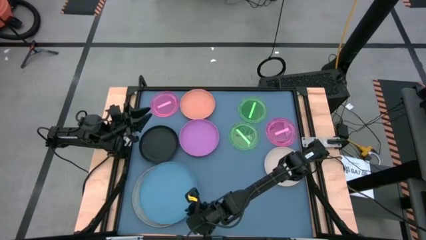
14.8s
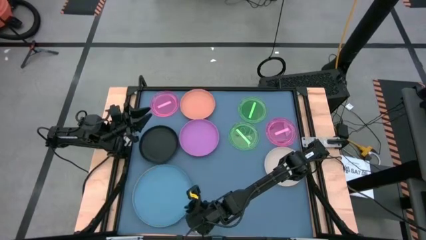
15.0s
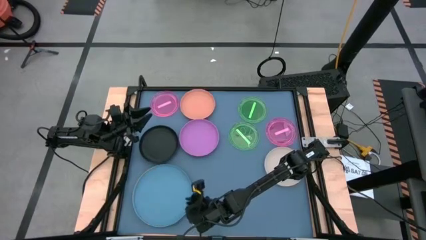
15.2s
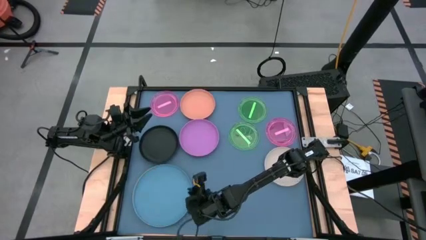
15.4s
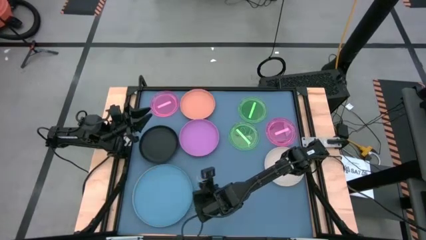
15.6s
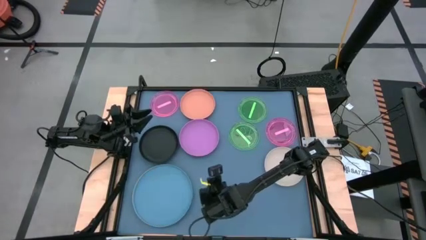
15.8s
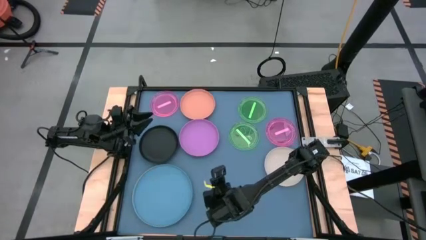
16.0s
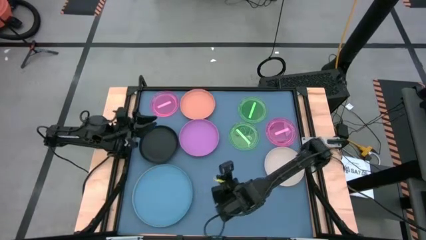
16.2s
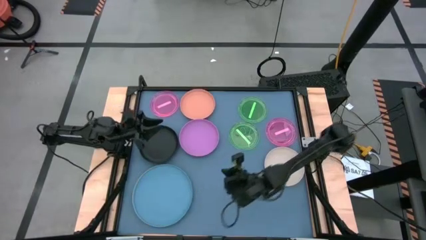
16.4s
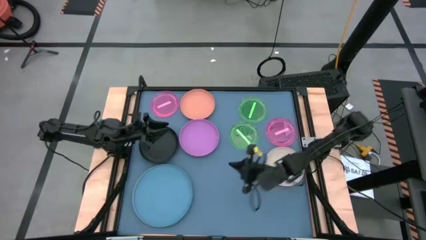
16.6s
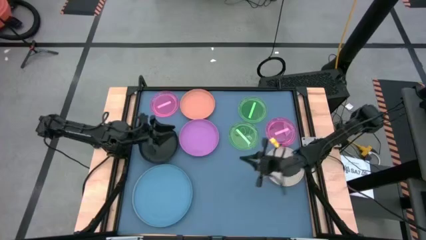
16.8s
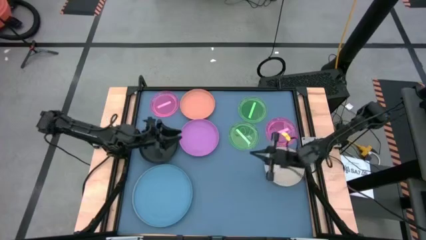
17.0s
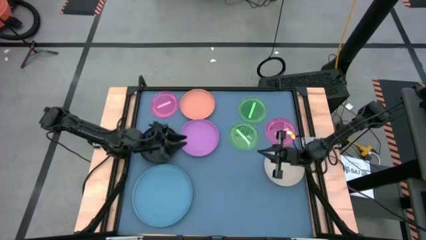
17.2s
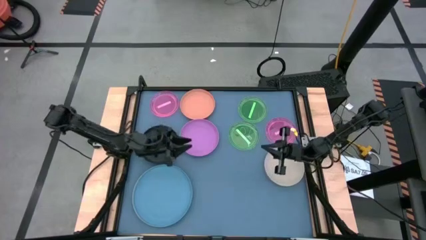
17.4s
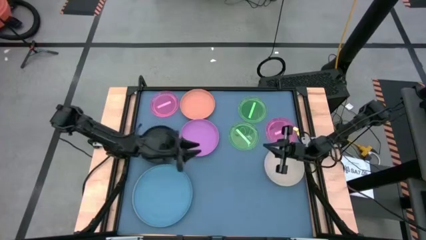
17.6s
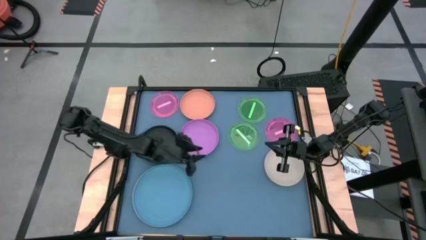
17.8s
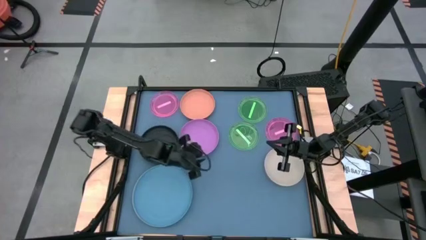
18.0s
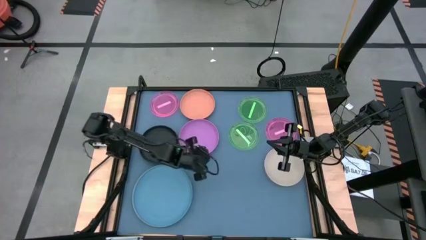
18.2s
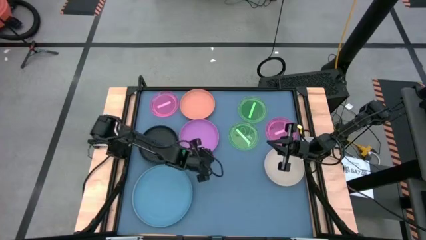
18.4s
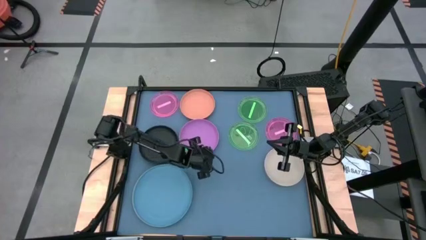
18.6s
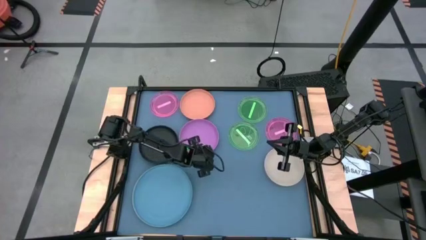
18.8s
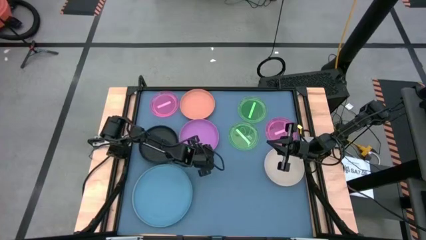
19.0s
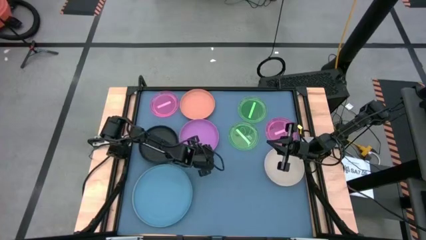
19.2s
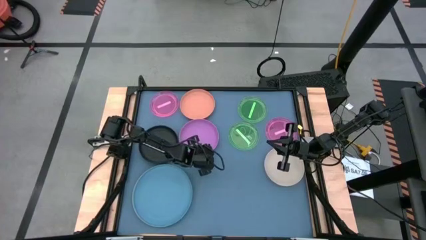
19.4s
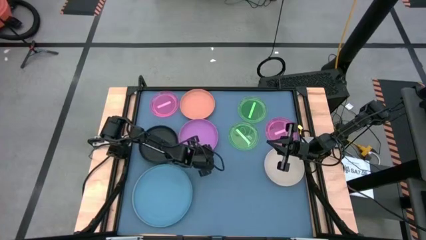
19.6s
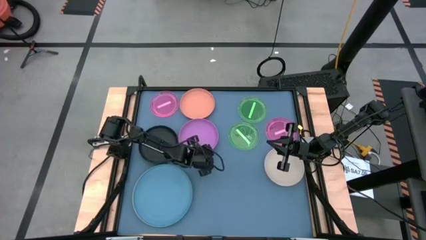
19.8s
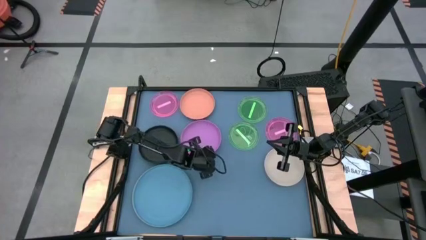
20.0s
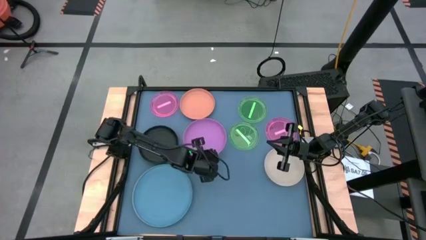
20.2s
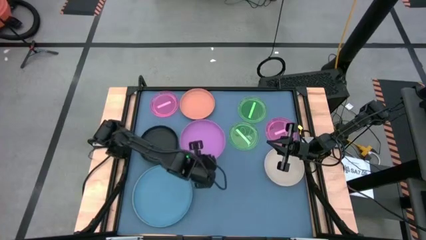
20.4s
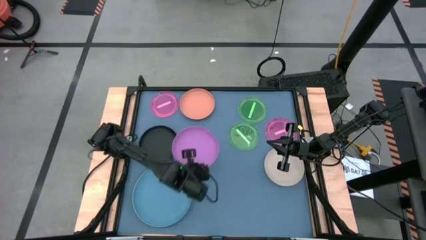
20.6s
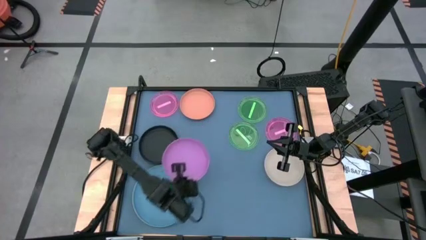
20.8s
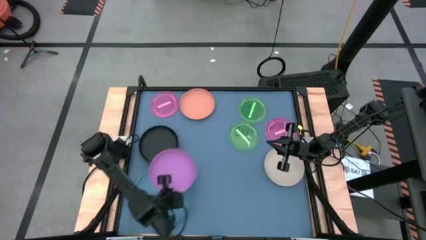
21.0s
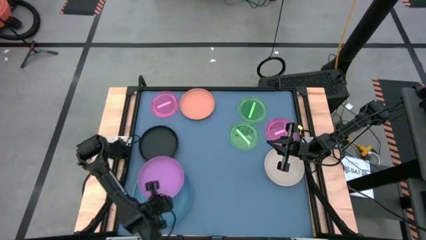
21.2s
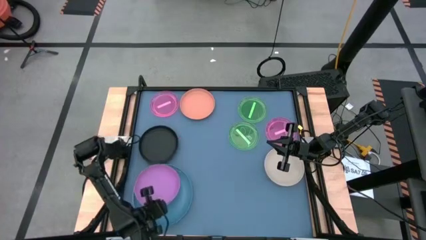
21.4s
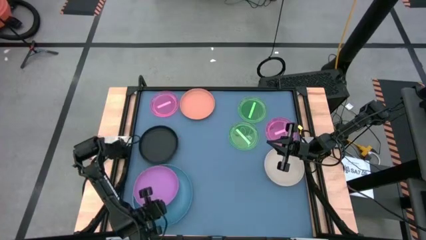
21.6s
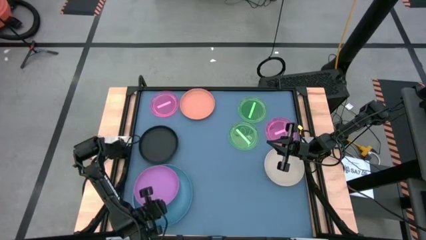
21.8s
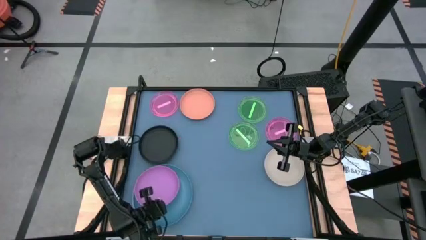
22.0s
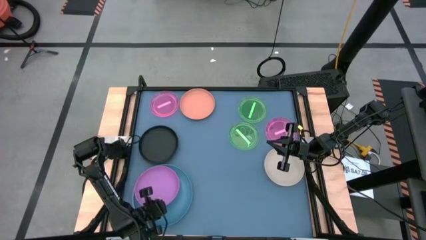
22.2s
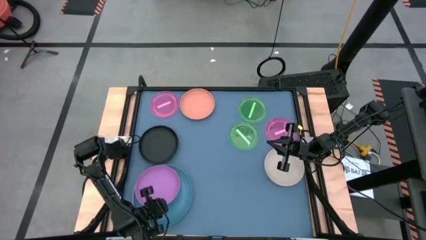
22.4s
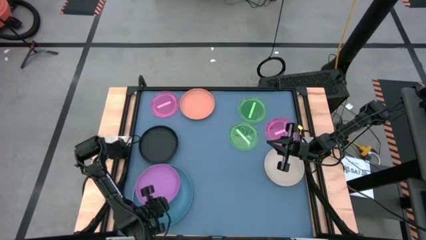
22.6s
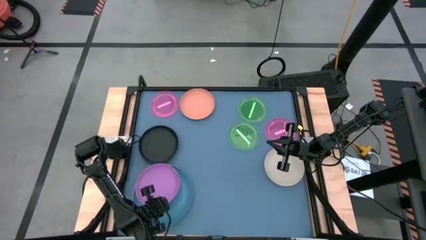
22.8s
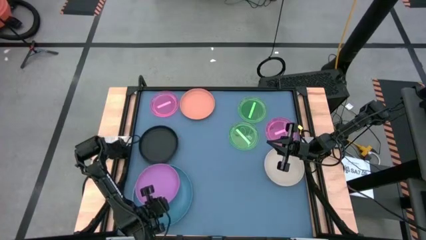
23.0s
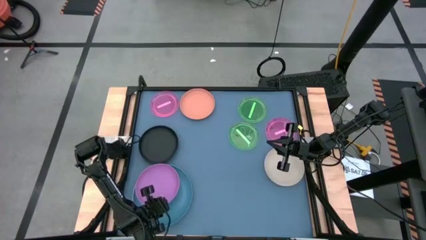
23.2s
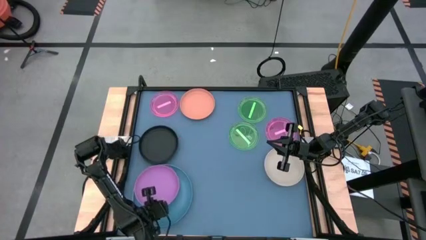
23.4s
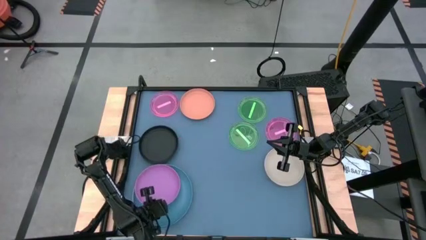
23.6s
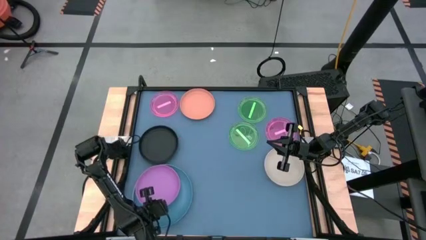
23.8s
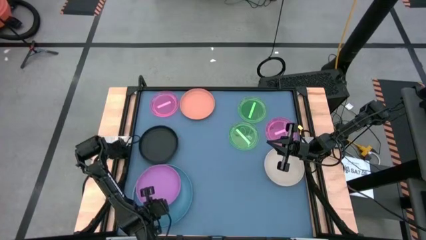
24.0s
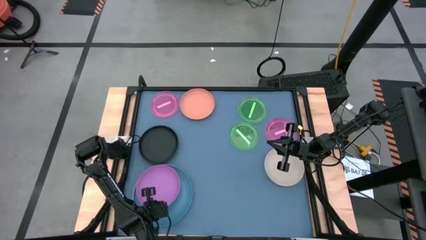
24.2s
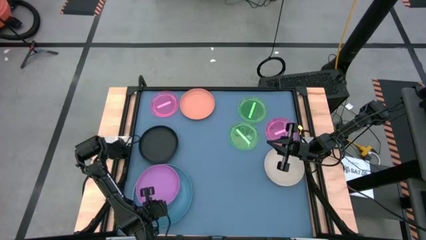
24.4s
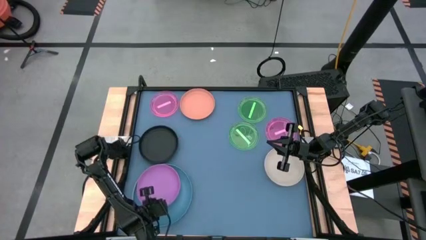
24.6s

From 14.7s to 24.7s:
Task: Stack plastic plates
Stack the purple plate on top of the blue plate

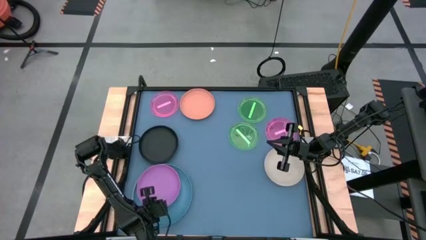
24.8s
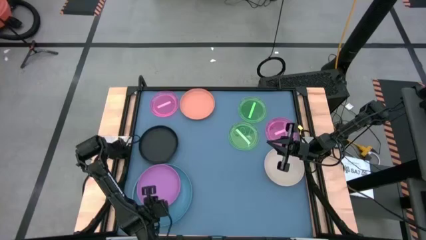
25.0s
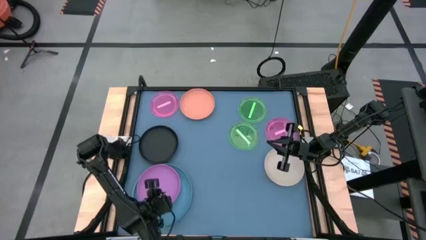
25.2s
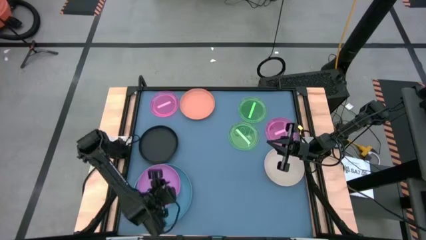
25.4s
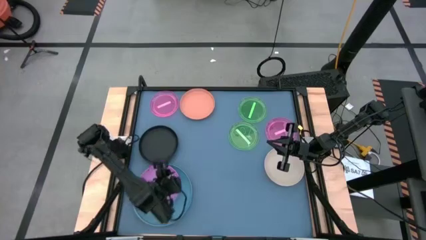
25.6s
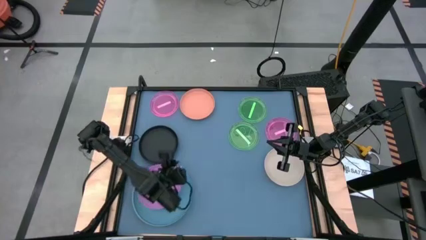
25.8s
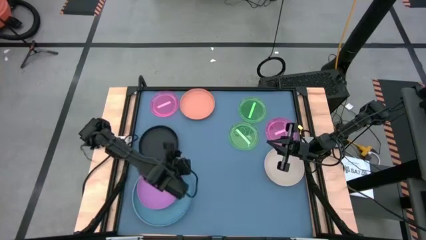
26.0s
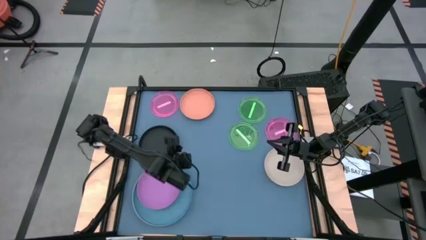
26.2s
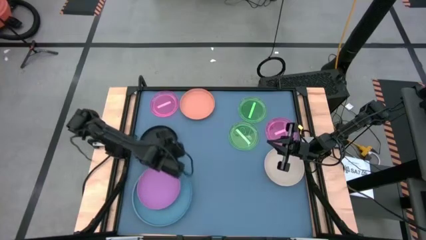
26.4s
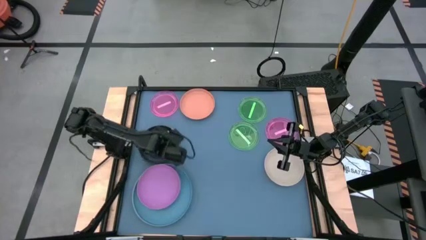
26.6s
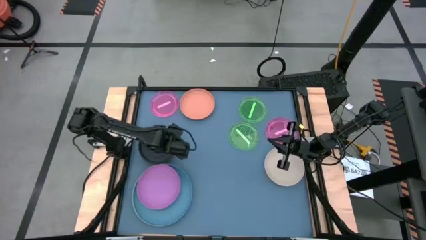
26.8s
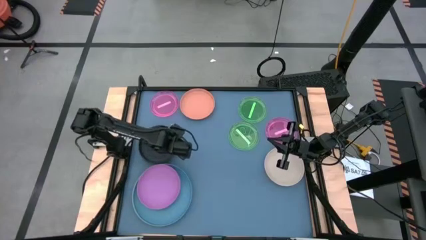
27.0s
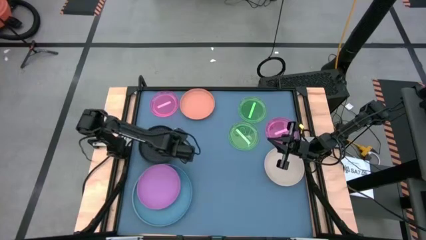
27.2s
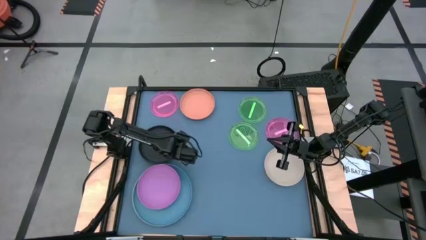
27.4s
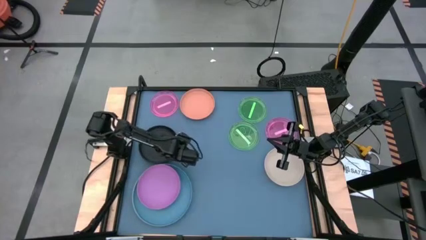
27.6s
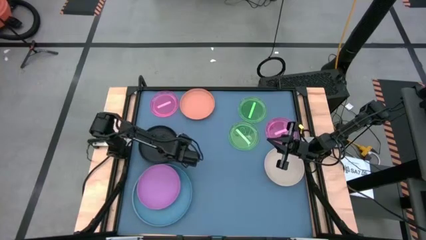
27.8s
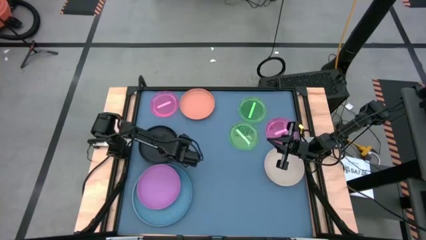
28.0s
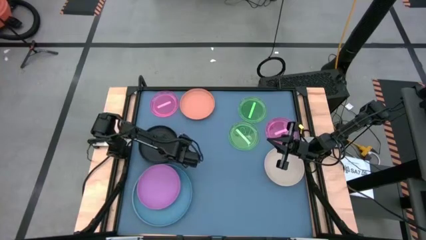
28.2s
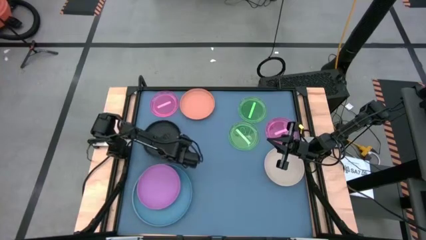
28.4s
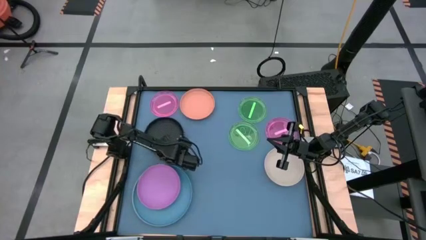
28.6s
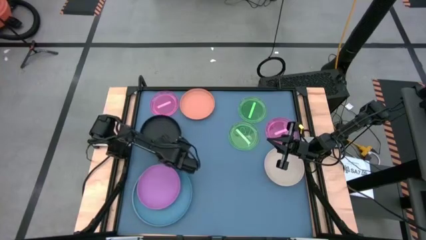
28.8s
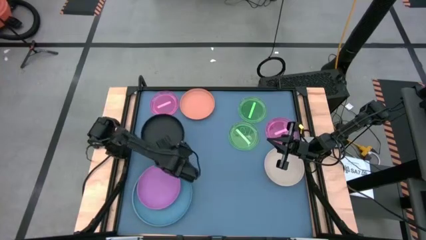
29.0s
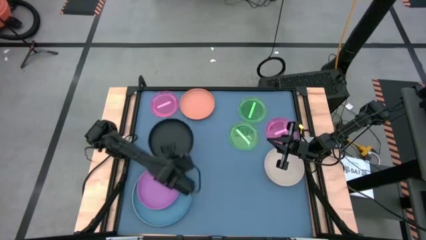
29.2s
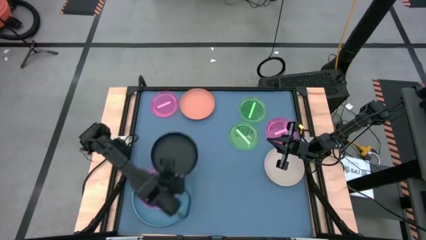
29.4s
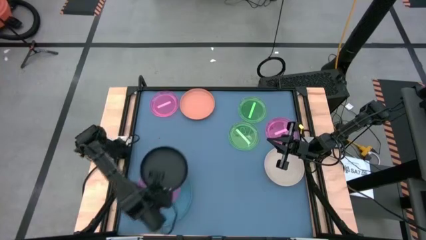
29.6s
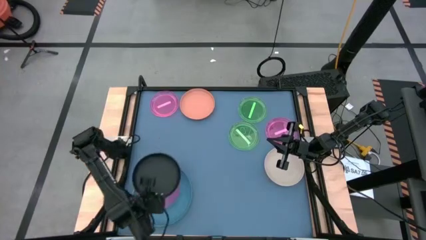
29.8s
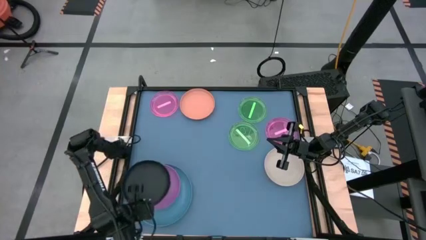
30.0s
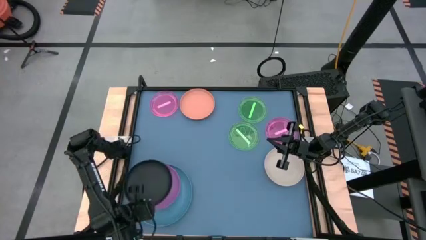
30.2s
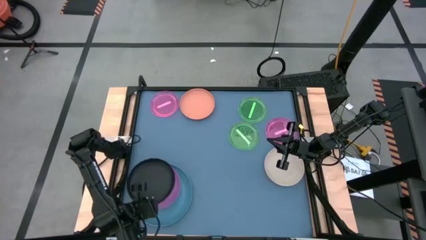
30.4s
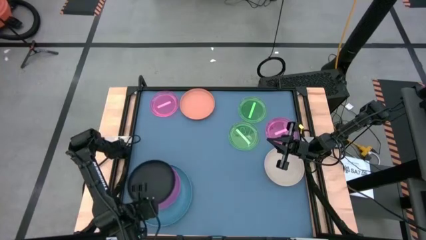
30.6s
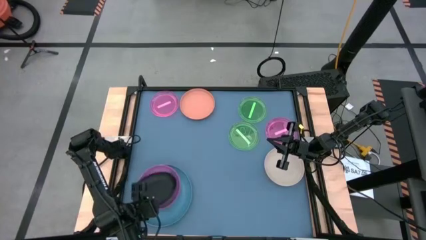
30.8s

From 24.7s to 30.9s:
Stack the black plate on top of the purple plate

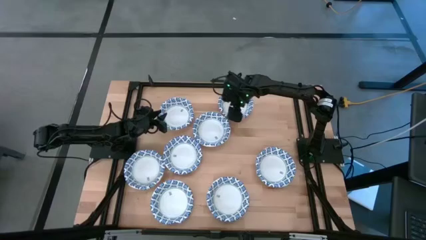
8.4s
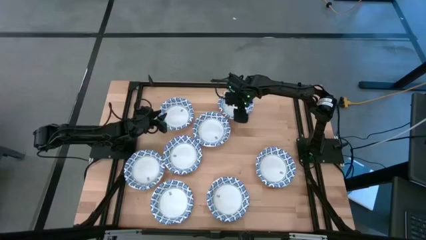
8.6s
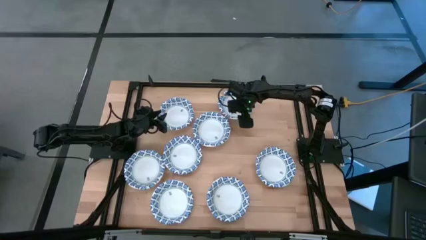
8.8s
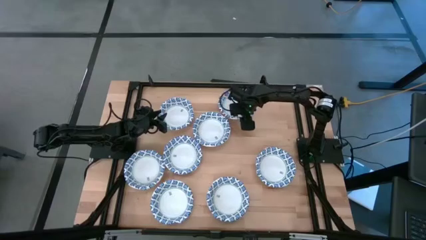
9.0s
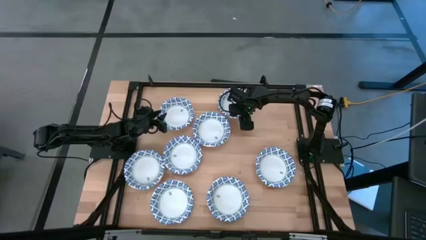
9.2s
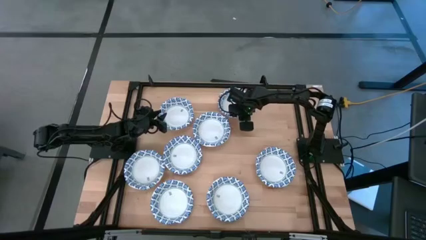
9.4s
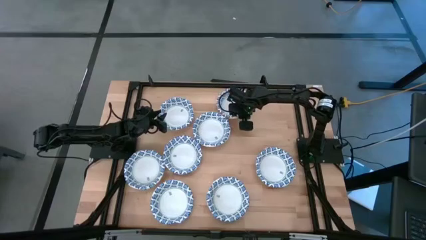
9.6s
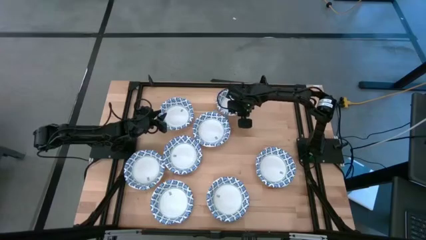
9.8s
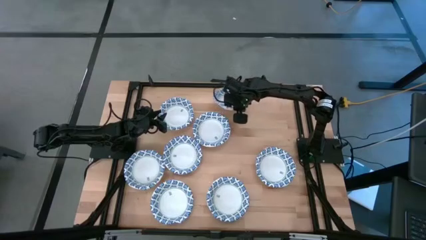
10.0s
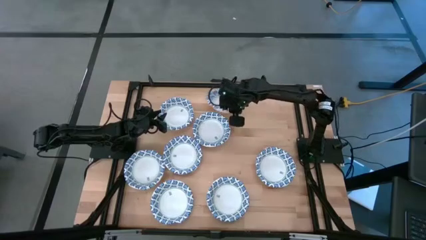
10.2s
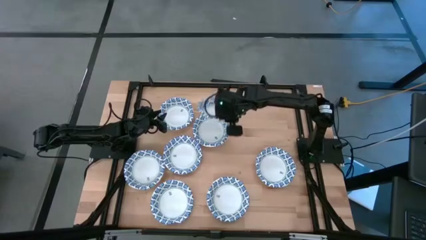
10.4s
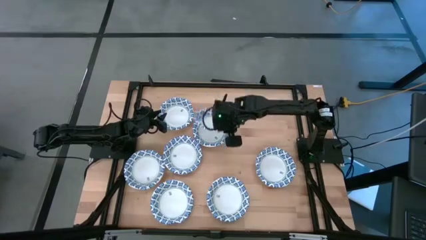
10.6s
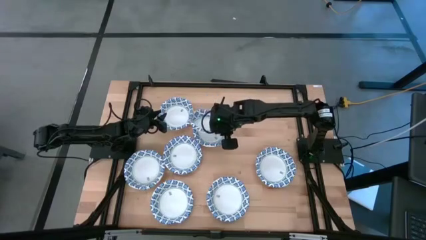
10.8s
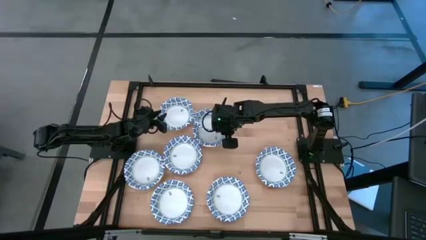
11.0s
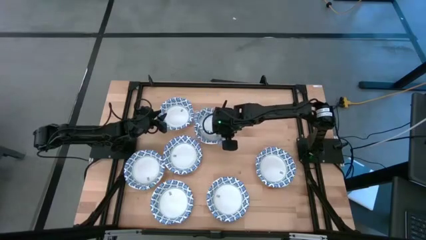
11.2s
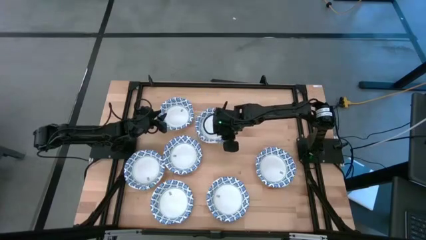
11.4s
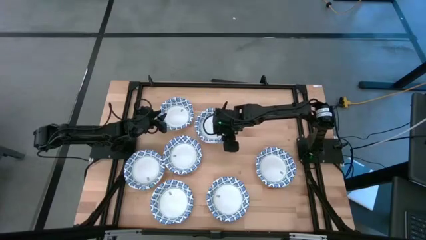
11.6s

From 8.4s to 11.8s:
Task: Nest bowls inside each other
Stack the white and blue bowl on the white and blue bowl on the table
